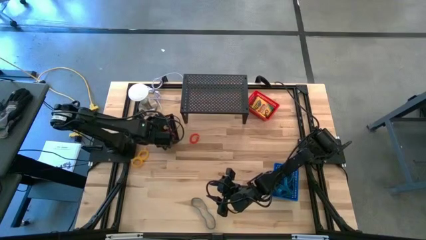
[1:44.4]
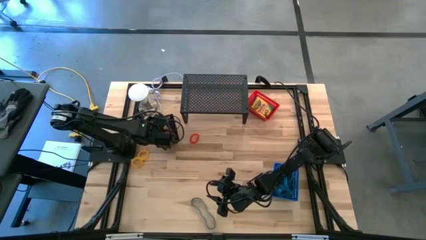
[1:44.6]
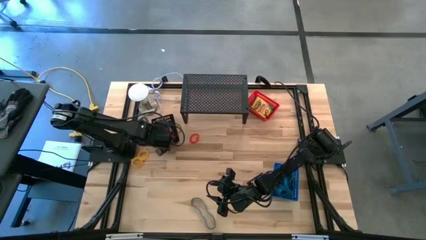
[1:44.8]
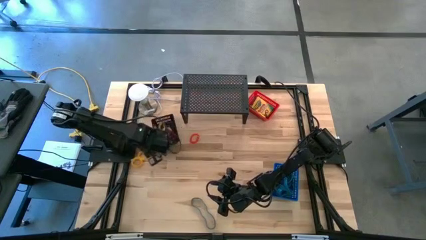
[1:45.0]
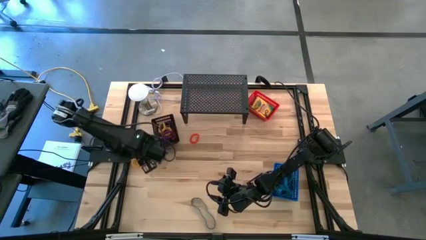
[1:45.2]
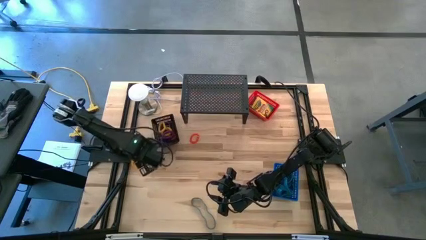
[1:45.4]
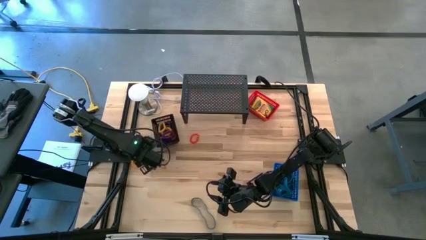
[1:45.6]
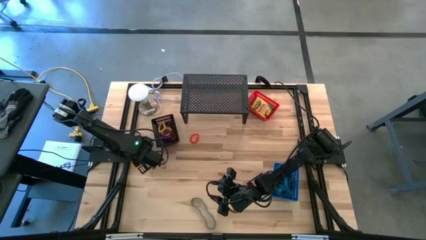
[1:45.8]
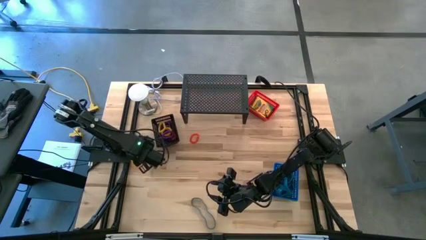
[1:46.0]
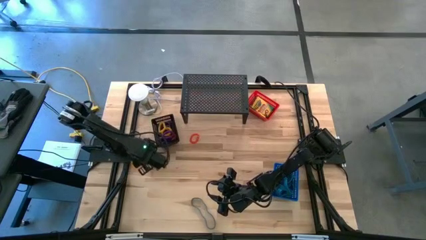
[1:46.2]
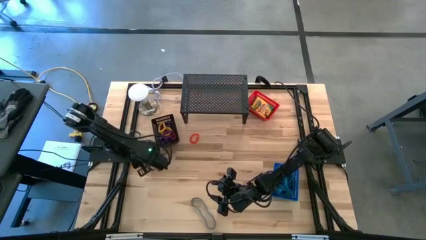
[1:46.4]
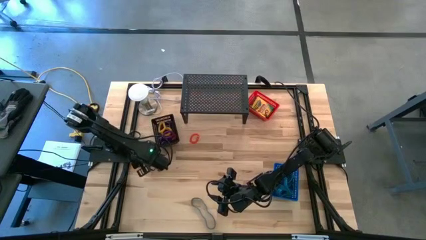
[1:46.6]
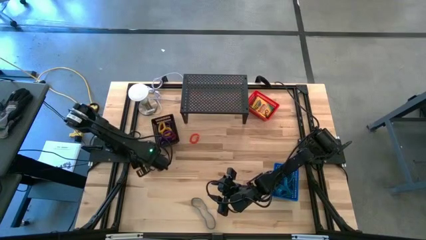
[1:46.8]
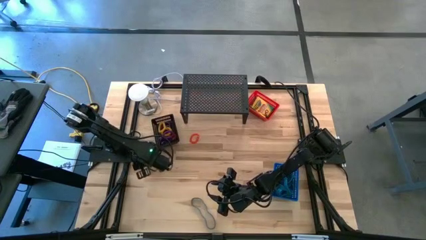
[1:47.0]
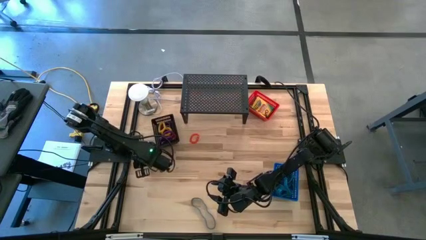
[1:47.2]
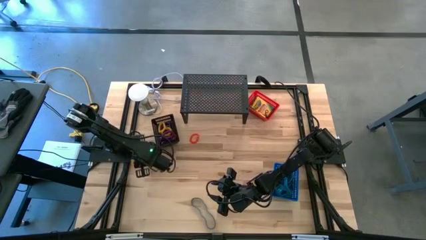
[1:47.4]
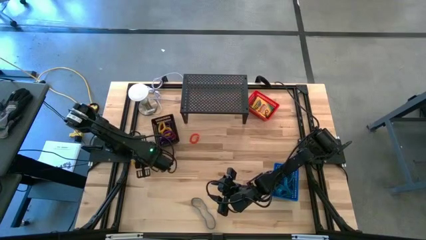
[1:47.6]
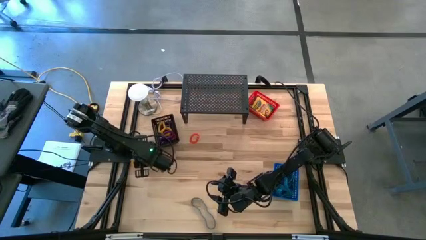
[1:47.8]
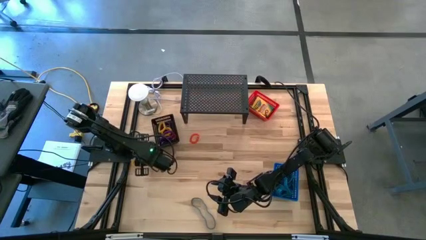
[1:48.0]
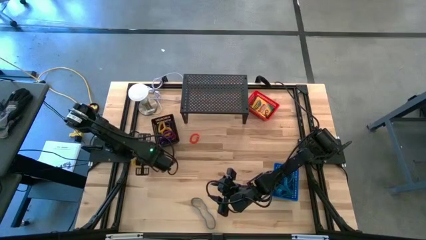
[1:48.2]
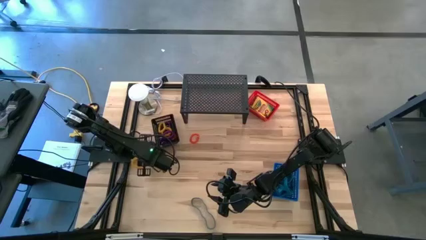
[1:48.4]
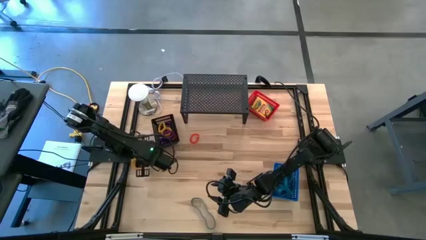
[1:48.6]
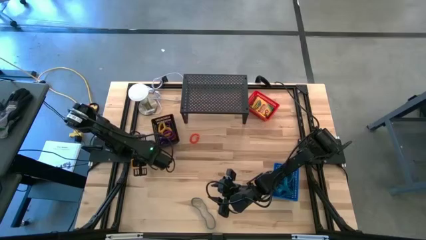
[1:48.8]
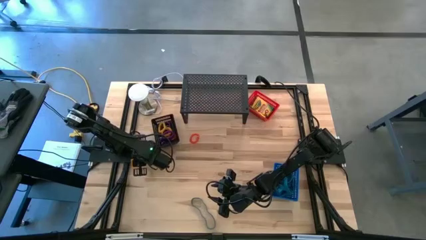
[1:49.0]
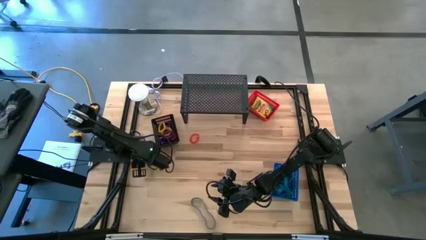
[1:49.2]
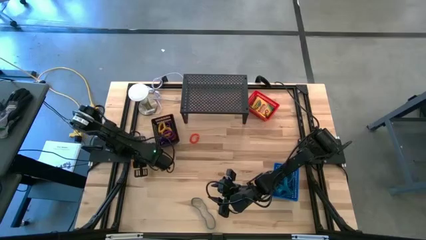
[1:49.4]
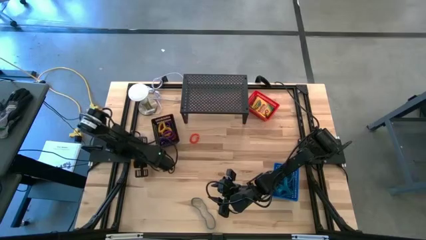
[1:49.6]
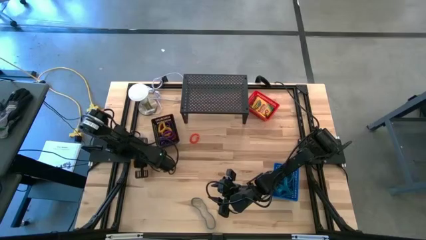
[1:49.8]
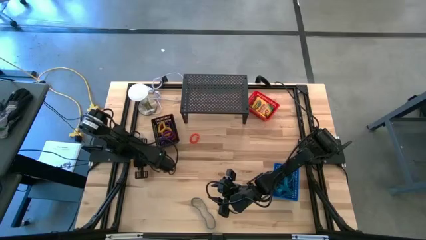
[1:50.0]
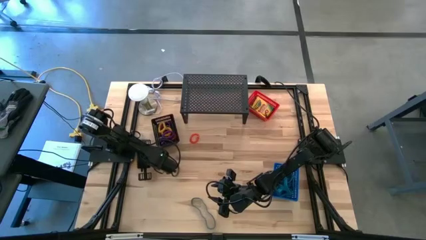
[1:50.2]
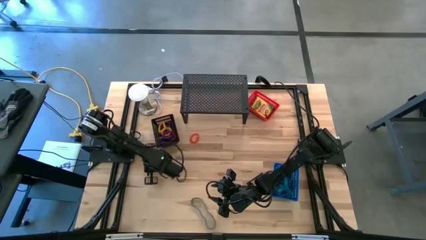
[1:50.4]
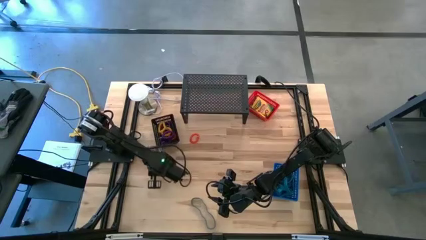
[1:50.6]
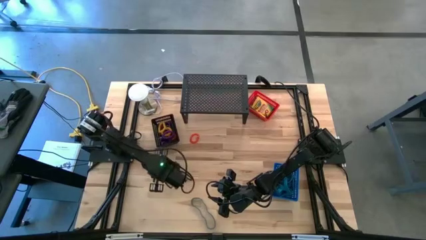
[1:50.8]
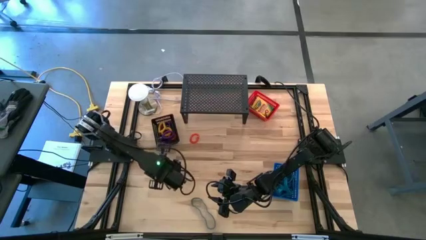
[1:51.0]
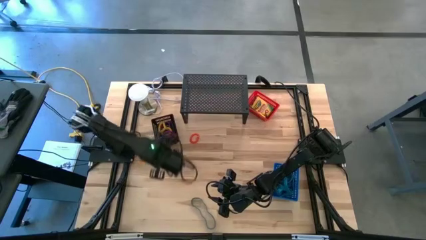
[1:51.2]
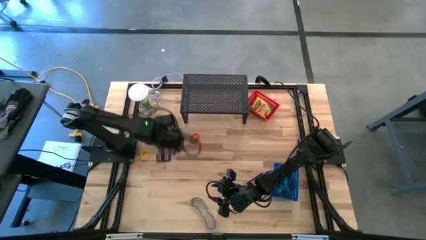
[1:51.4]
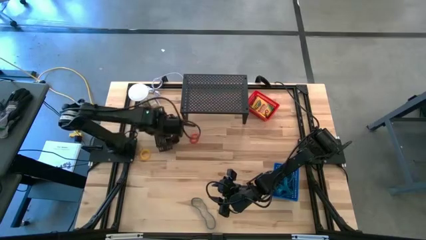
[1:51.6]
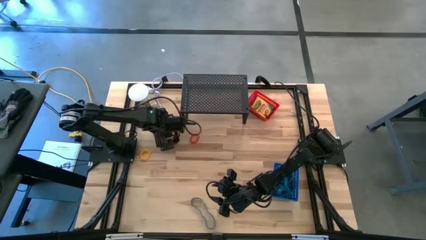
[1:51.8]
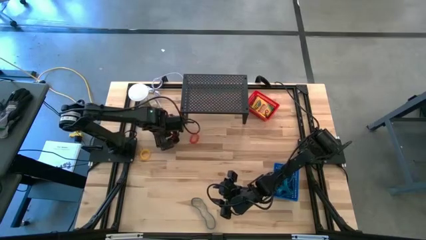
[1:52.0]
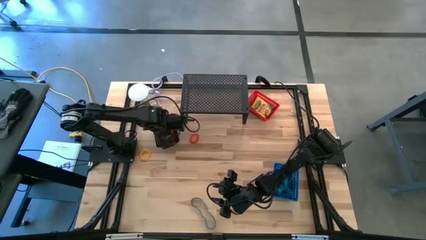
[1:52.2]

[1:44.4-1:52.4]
Task: Pick & Place Office Desk Supplies
Put the yellow spring keychain into the black basket

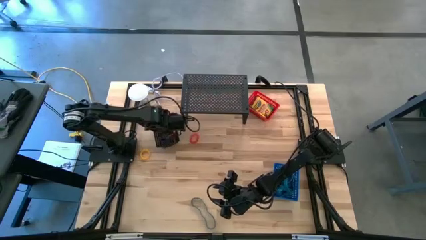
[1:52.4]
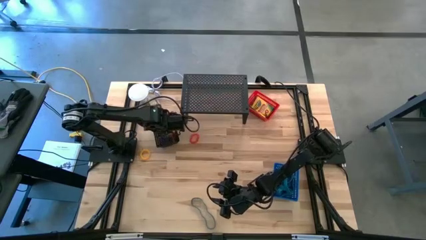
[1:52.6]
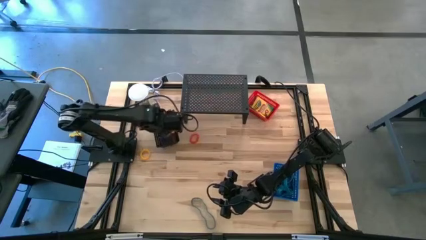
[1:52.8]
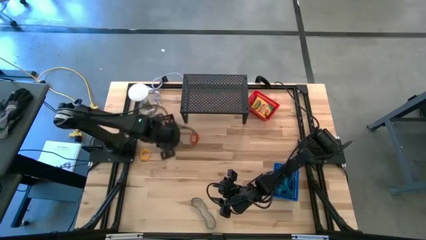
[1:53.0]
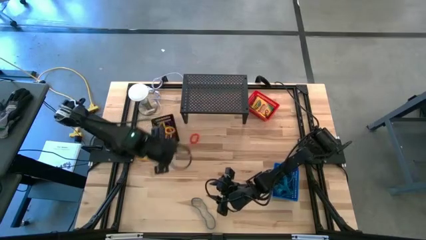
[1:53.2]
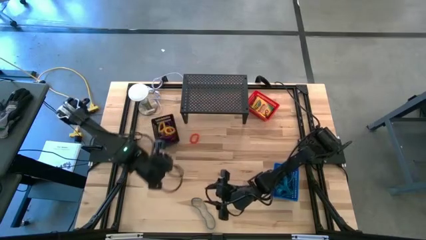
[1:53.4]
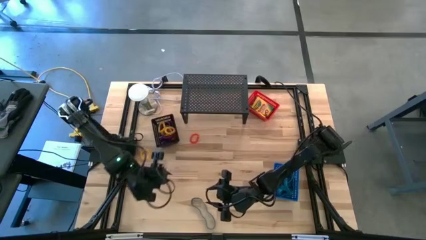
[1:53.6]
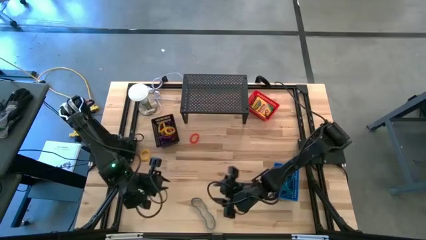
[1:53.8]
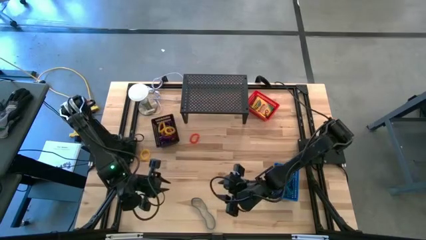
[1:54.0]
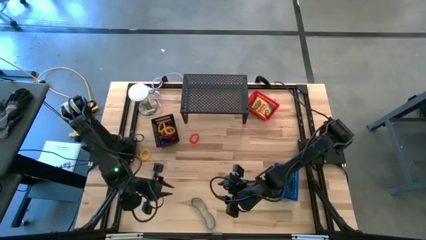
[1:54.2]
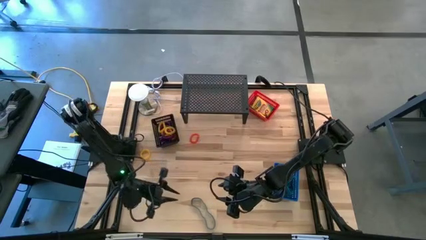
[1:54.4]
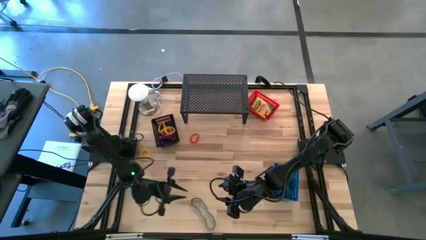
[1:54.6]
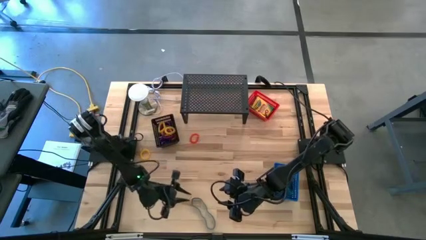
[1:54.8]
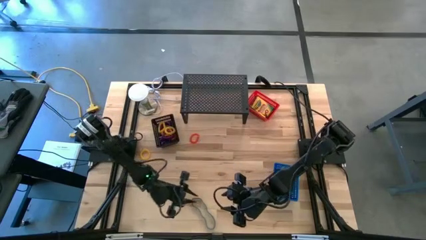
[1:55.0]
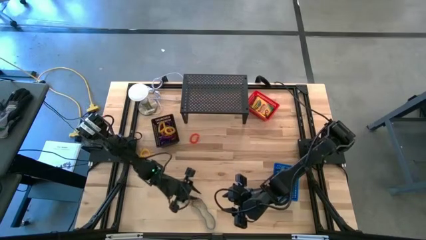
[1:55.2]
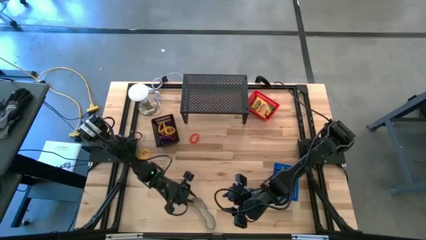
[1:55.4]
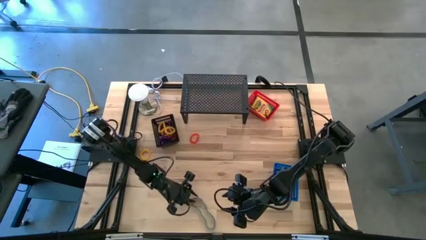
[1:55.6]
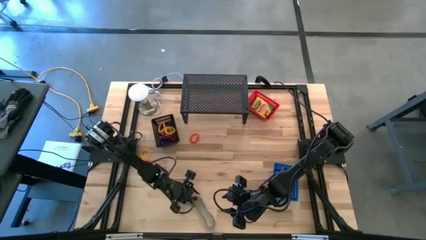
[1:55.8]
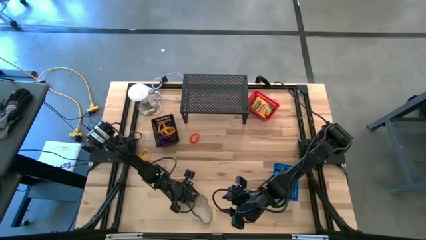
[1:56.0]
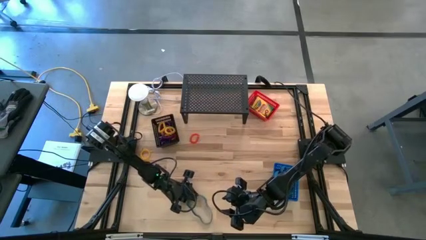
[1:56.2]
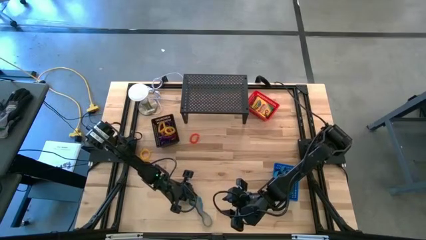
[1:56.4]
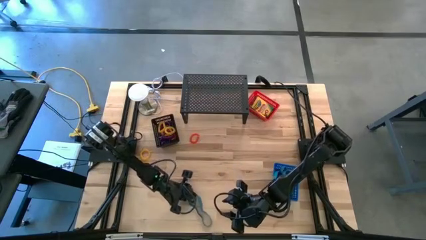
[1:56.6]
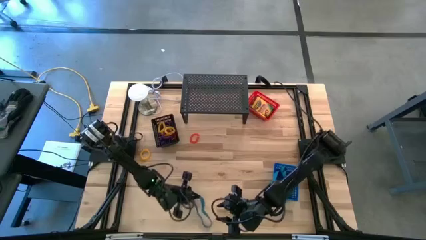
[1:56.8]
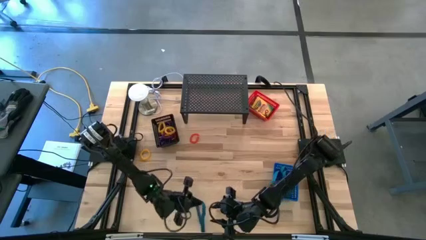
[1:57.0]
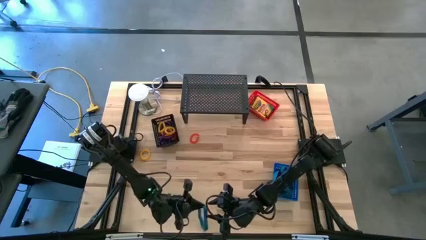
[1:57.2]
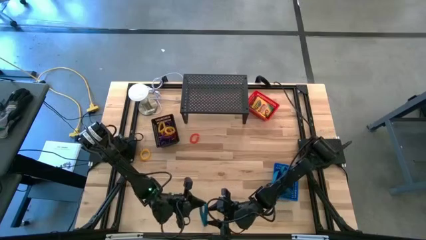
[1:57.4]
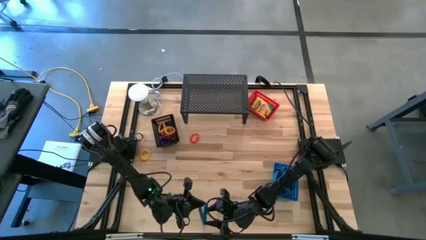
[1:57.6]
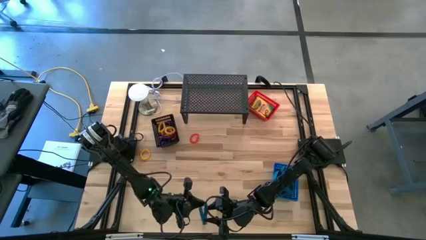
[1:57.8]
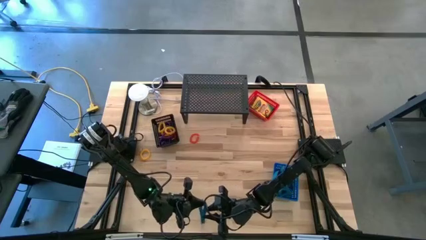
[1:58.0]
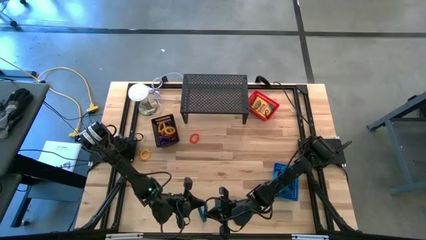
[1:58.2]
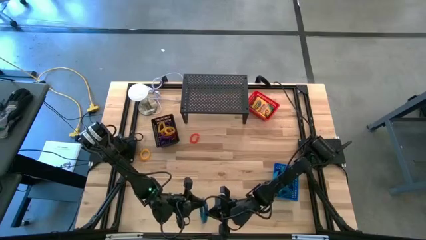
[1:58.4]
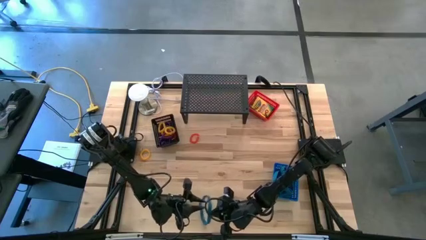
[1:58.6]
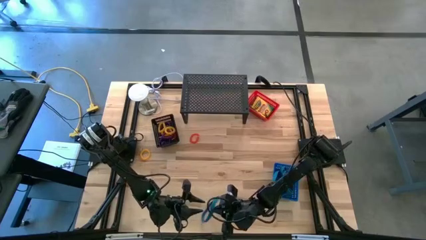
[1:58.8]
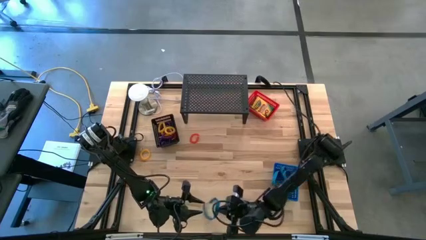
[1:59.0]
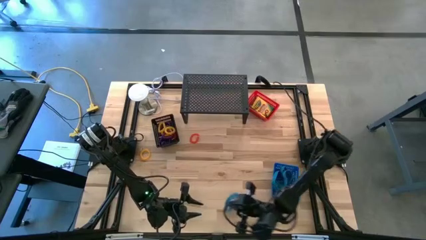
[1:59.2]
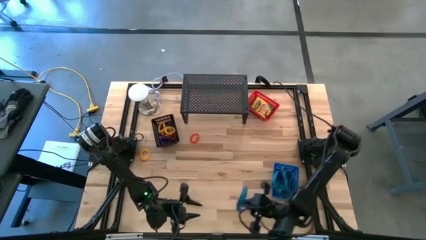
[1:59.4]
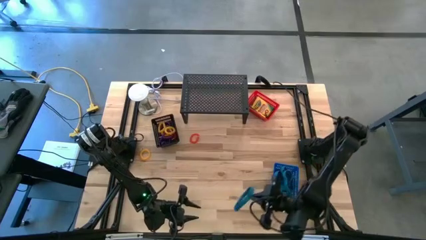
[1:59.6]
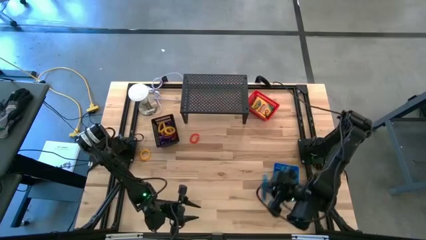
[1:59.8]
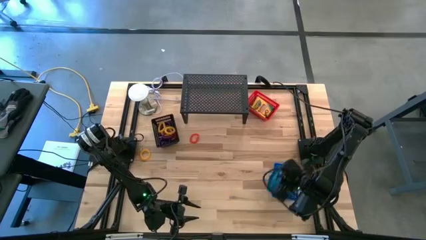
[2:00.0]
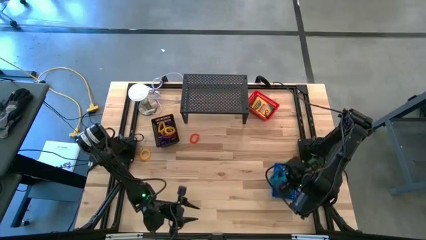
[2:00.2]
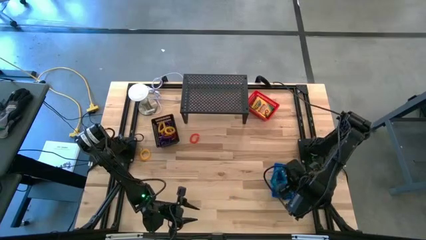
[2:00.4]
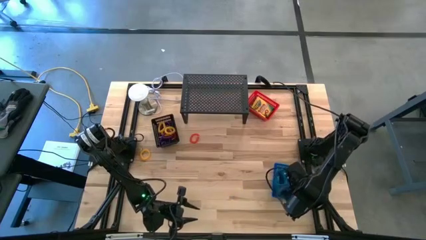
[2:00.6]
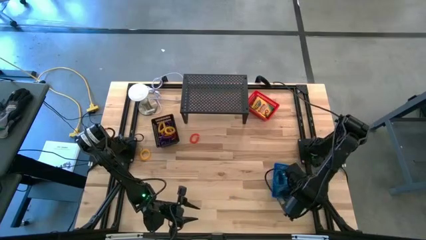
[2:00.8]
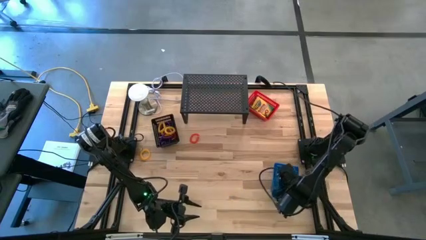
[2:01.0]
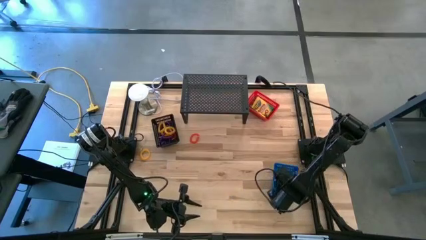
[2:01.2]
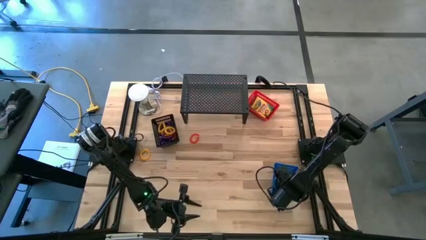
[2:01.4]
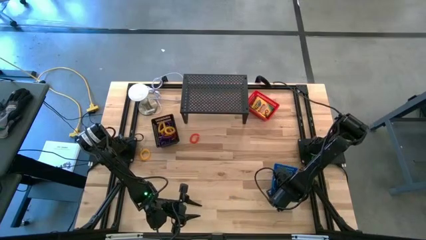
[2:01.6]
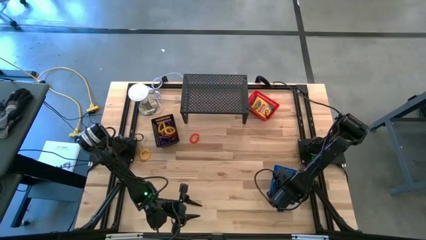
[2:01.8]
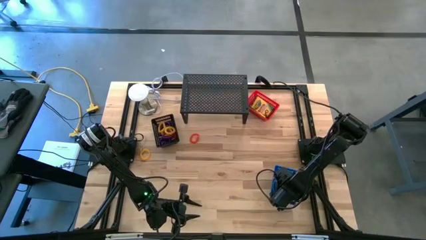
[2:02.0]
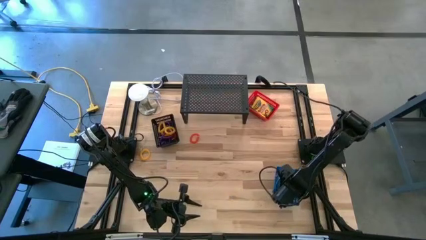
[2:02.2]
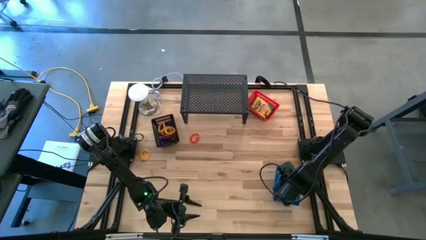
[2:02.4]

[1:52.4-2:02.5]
Put the blue rubber band into the blue basket
